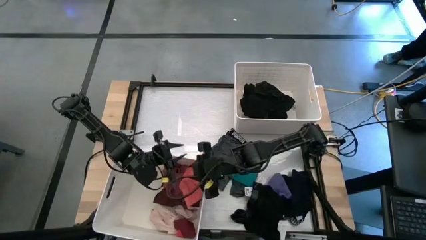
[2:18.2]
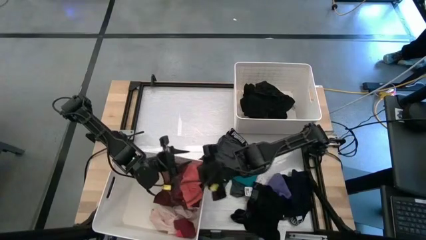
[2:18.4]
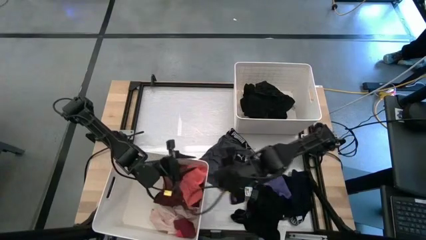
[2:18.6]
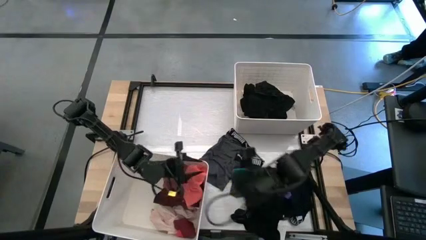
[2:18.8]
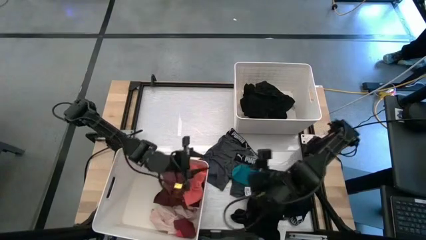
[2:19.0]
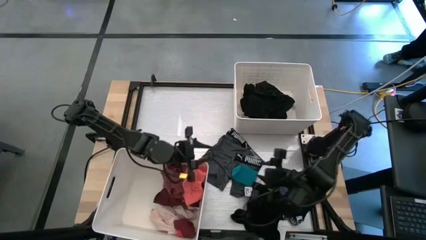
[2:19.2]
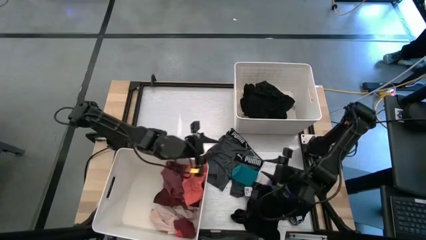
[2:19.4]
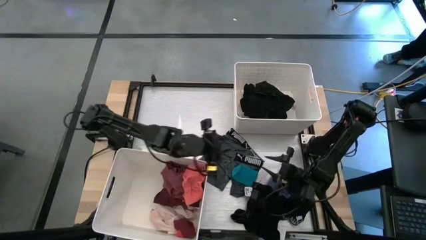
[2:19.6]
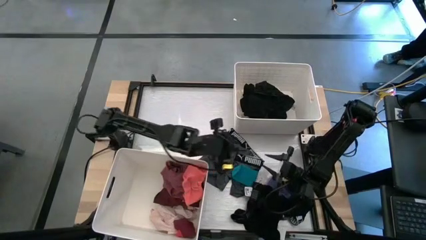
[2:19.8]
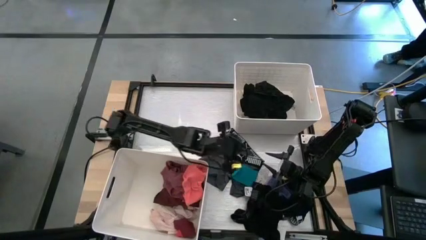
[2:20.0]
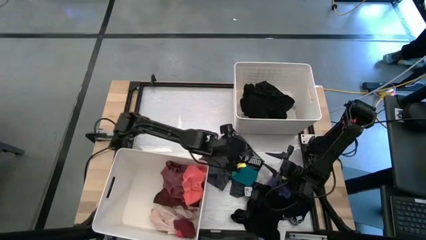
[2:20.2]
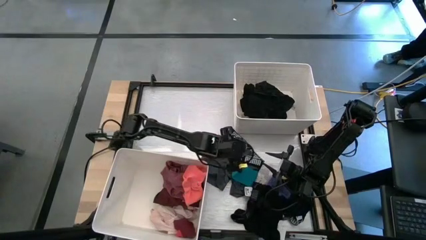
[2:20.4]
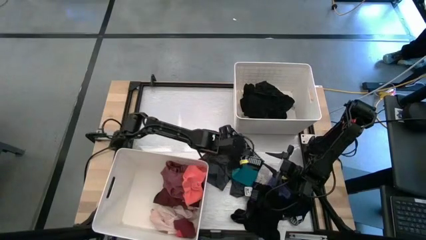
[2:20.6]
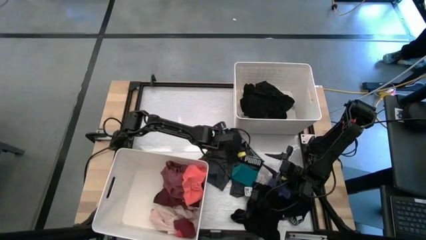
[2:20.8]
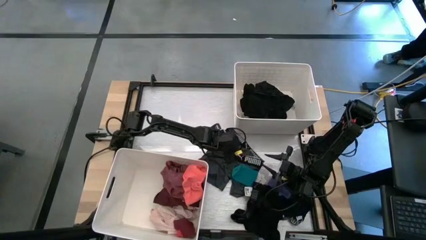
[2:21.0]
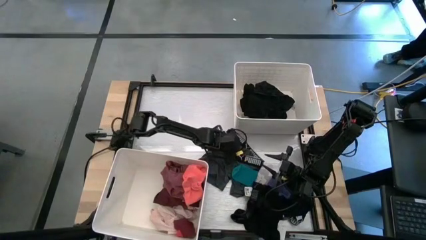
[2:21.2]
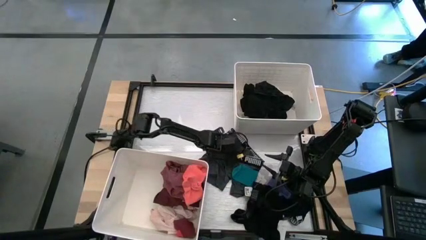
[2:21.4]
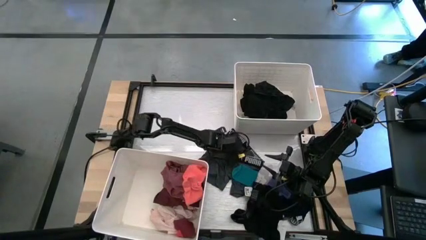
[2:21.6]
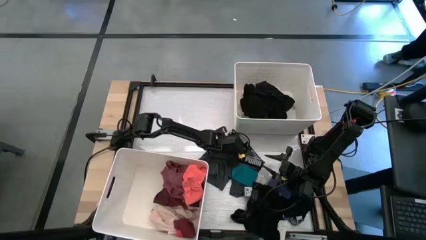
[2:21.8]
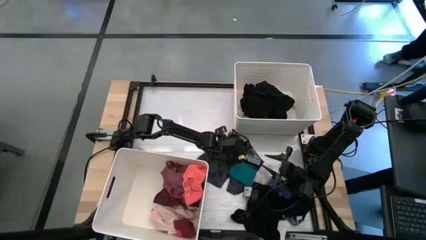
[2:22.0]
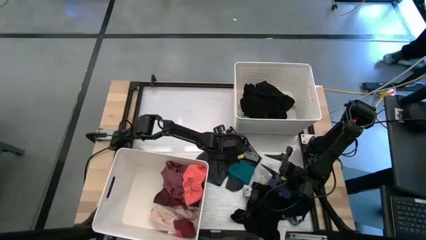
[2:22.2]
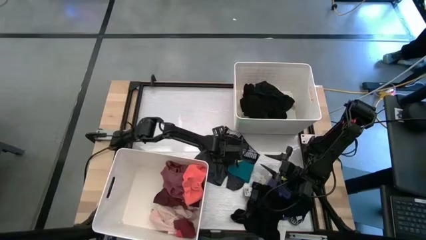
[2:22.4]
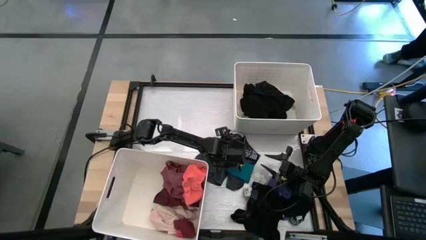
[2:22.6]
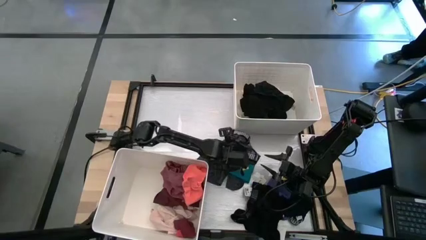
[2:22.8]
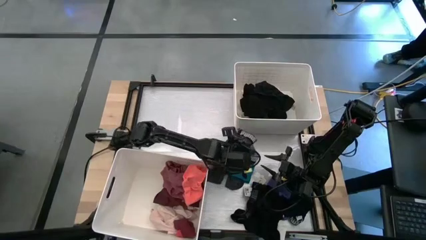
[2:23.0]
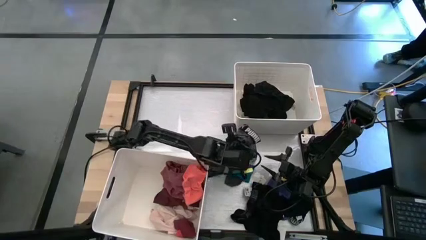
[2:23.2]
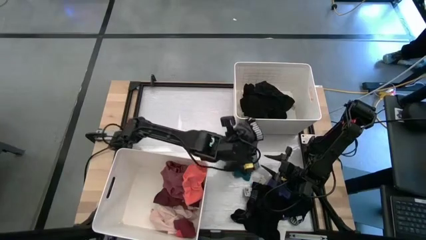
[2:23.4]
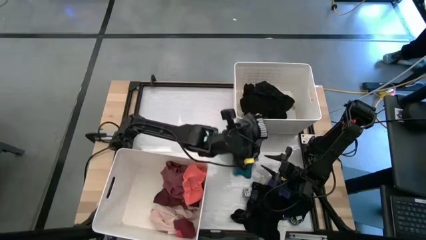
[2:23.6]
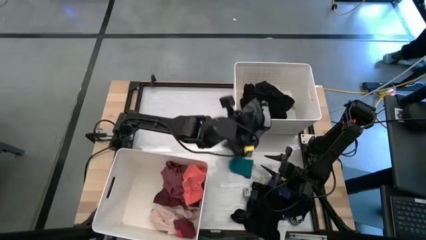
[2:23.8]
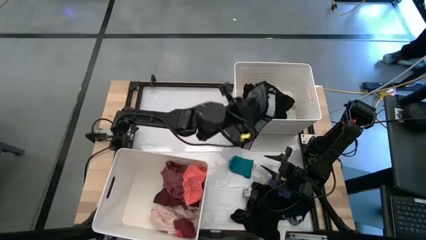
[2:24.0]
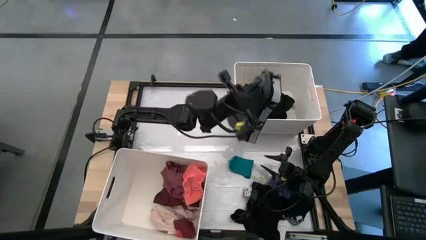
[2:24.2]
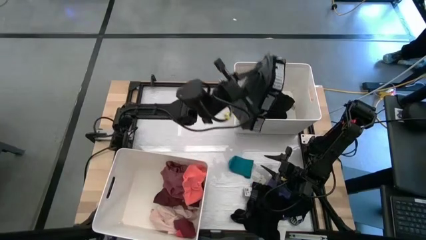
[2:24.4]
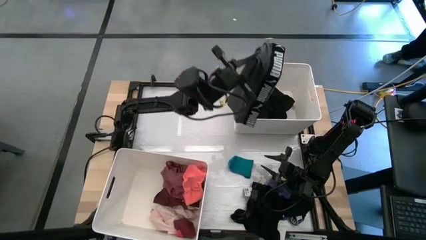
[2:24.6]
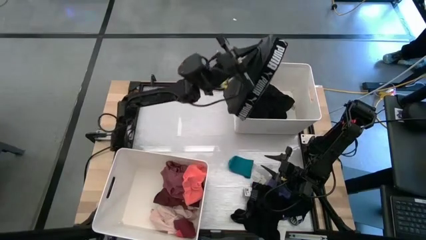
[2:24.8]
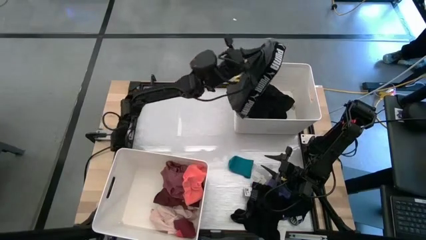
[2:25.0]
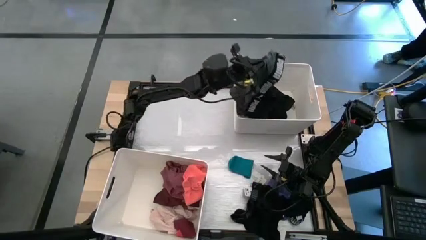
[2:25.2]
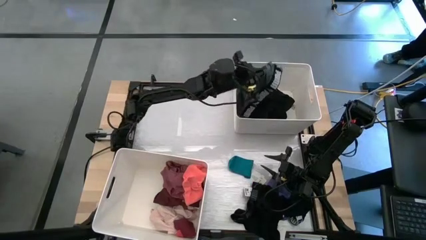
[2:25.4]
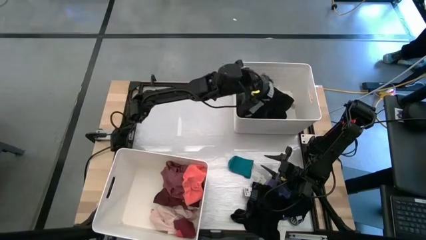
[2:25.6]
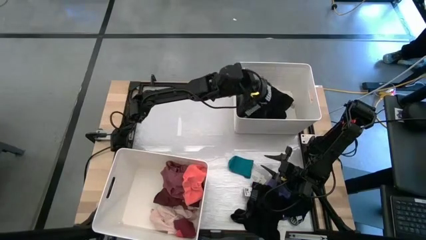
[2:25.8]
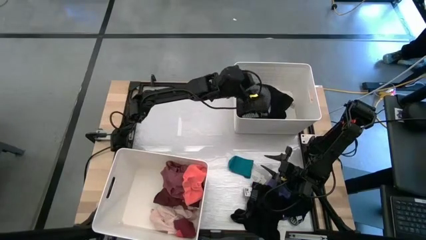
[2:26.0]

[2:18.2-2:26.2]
Task: Sort clothes
Put the gray boxer into the top white bin

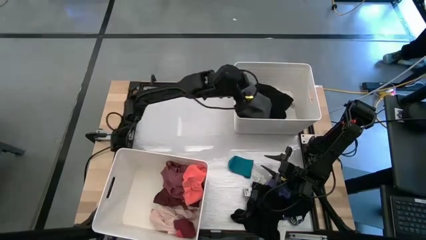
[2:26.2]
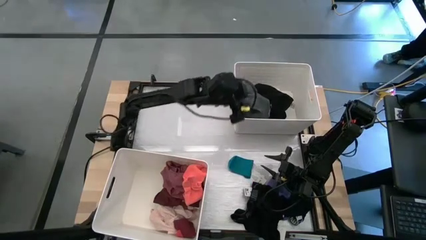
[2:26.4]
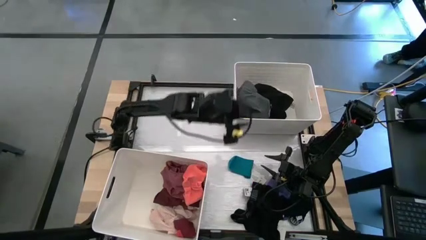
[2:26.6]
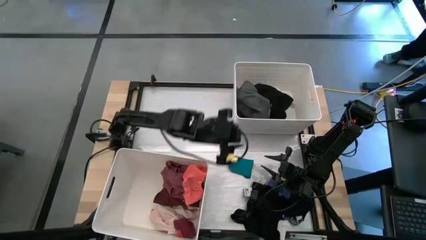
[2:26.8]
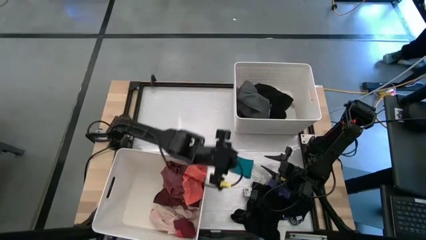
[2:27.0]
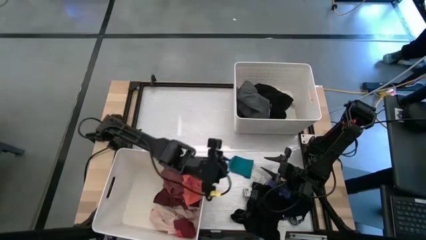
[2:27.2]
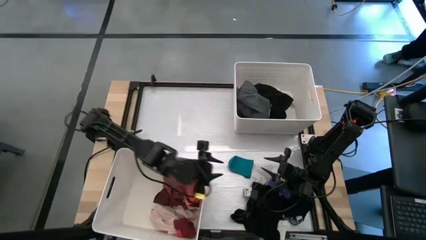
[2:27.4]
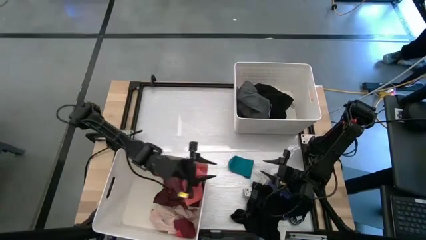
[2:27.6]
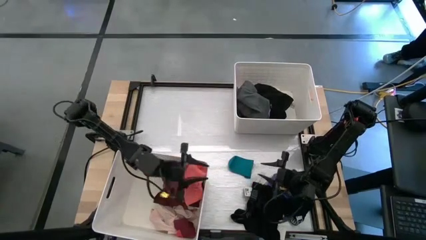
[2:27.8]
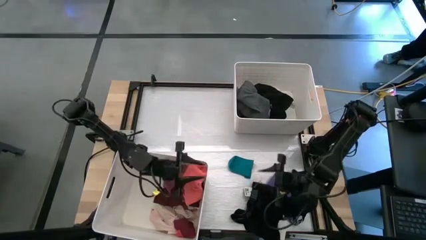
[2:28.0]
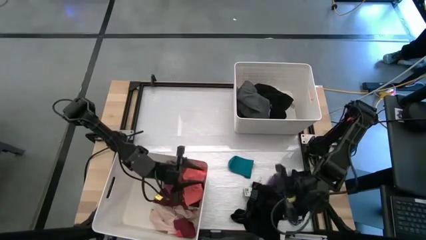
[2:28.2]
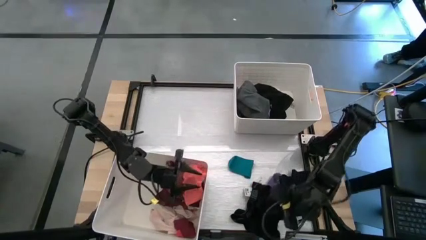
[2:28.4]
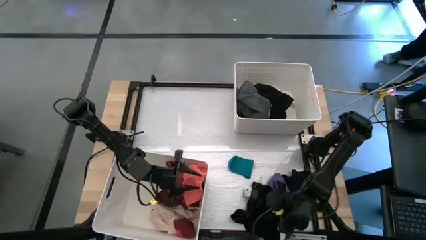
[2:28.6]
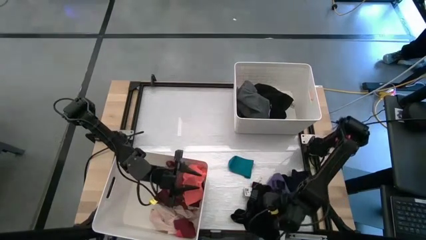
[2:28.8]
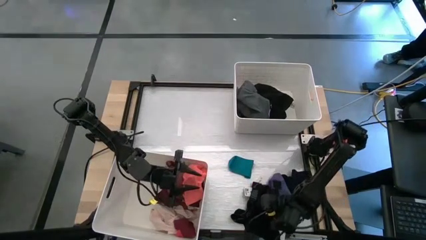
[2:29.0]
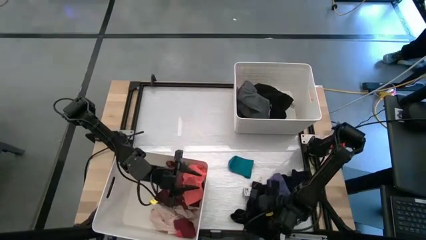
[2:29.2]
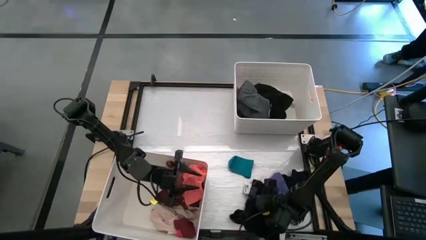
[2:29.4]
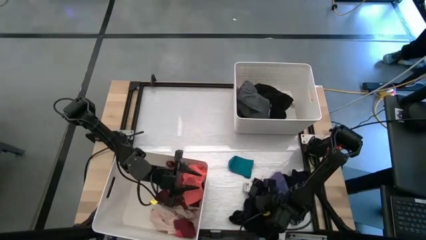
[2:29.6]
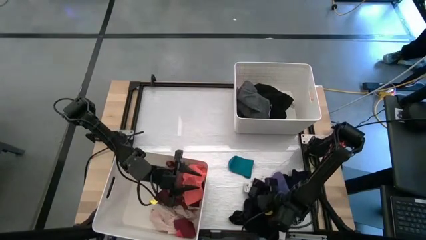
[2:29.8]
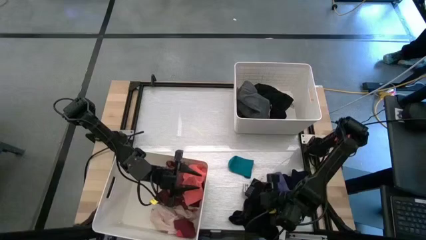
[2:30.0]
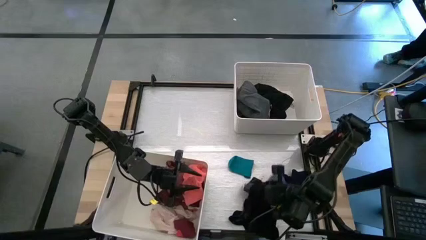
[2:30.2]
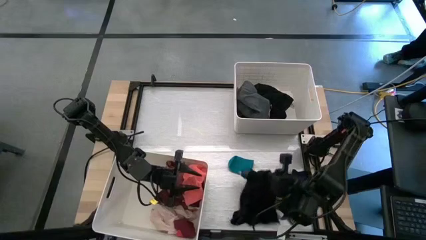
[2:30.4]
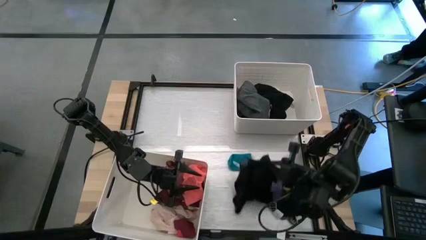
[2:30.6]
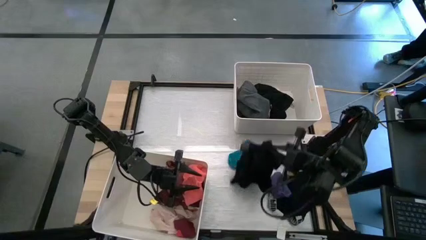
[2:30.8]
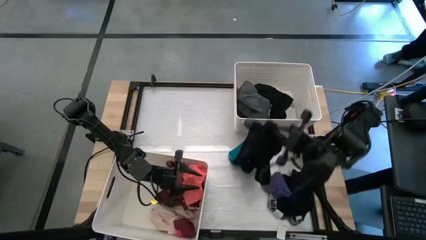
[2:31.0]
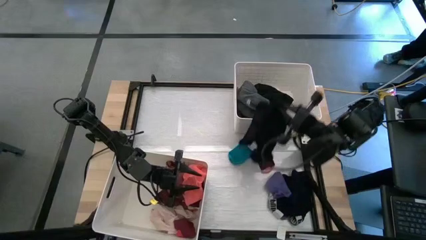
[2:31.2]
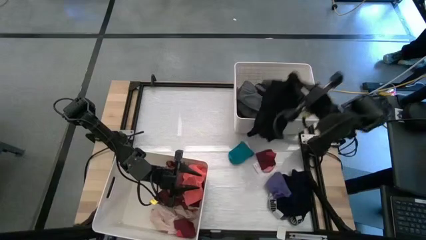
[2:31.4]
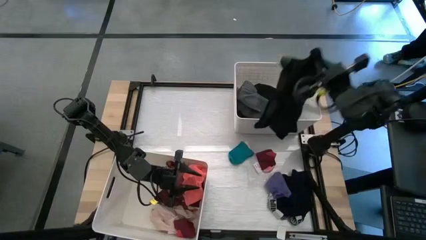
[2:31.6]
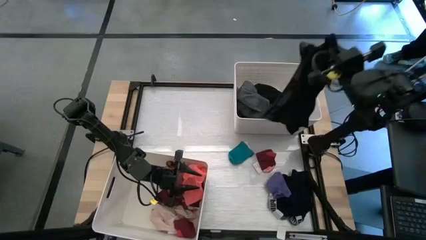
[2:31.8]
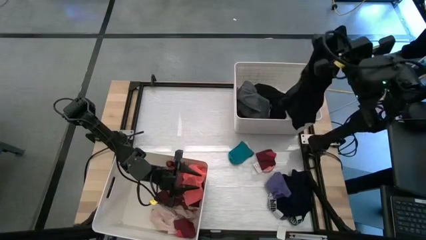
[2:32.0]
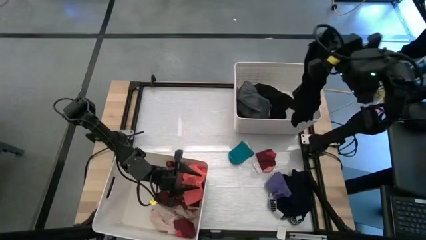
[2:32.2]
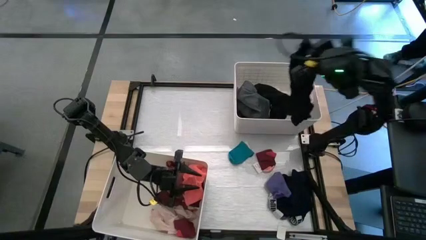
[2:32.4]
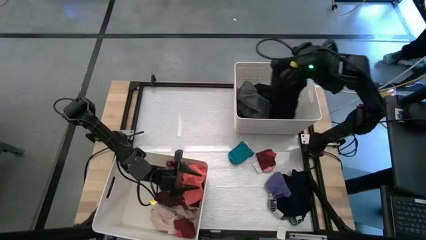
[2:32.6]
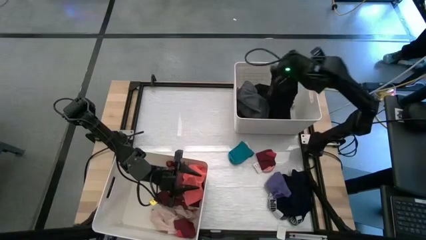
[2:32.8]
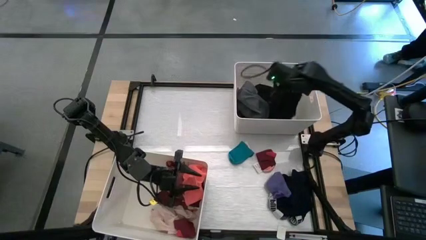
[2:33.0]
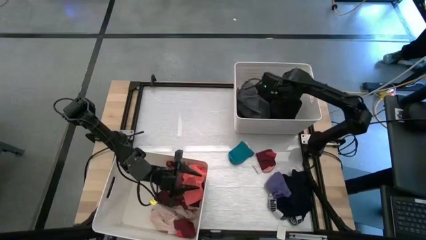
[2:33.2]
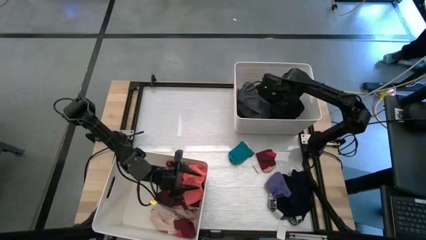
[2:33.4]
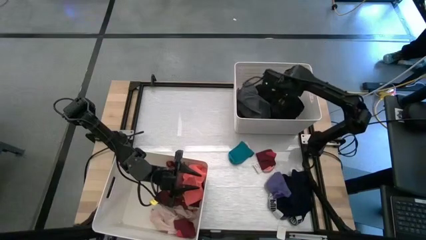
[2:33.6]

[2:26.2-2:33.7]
Put the black boxer into the top white bin
